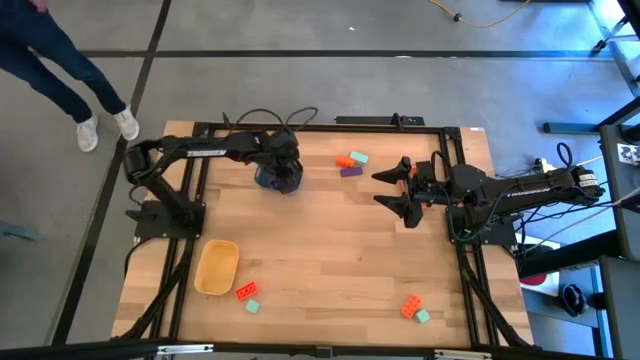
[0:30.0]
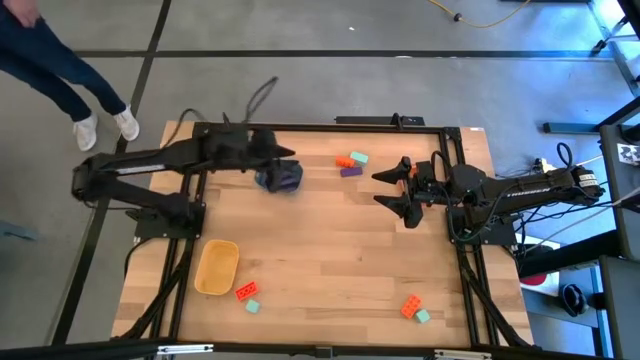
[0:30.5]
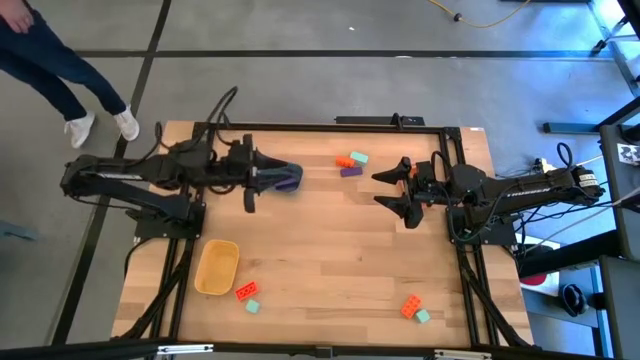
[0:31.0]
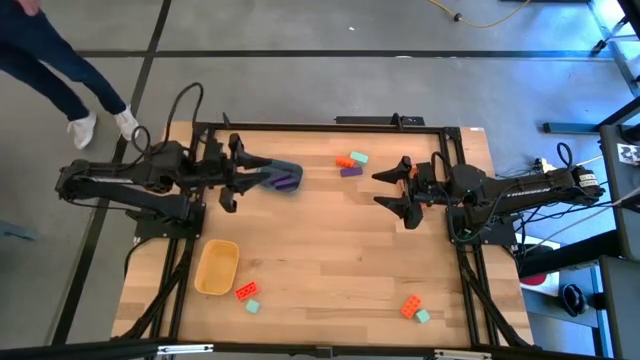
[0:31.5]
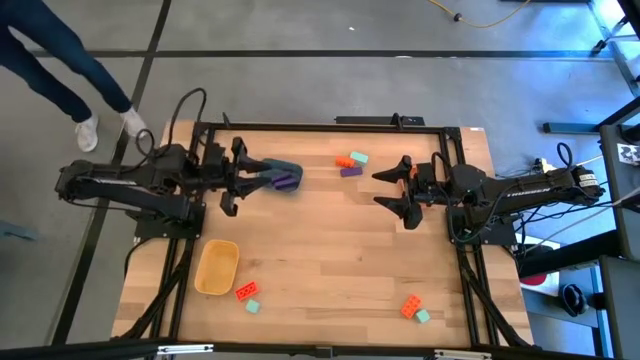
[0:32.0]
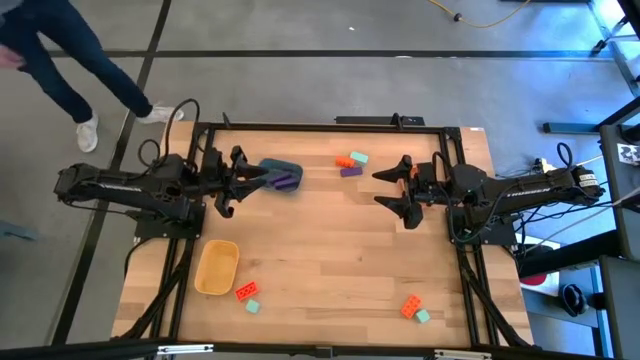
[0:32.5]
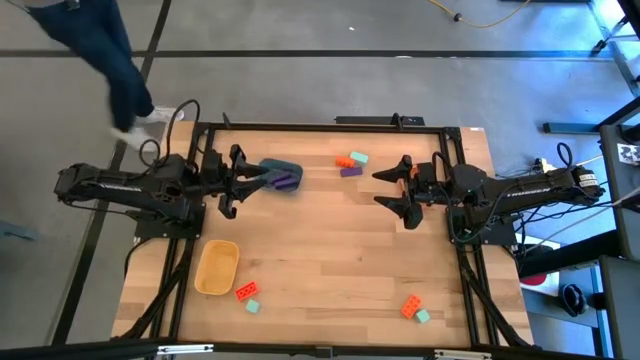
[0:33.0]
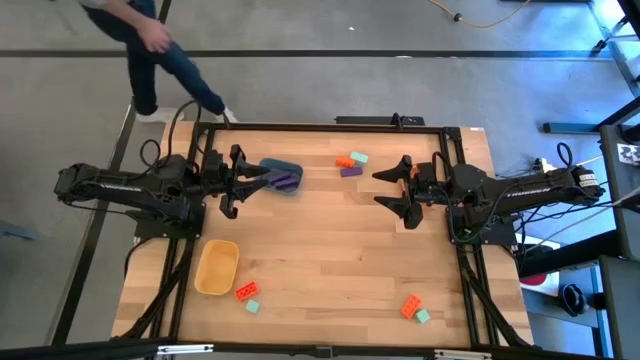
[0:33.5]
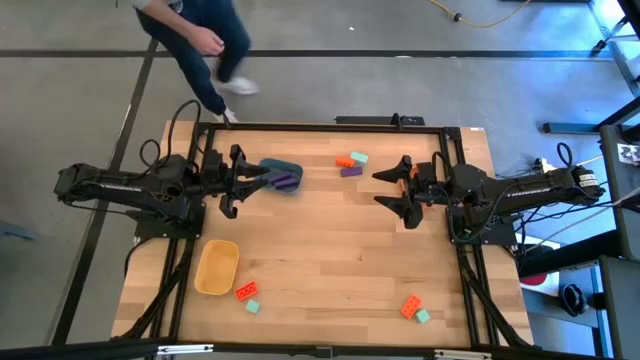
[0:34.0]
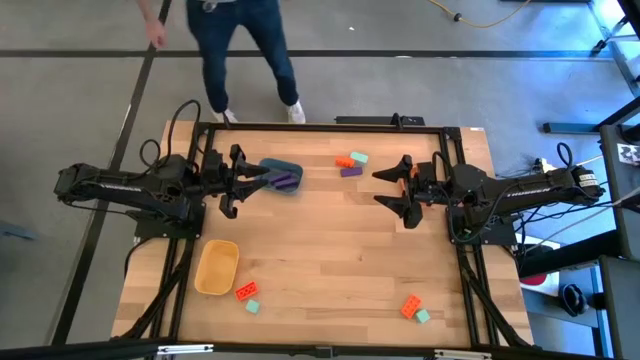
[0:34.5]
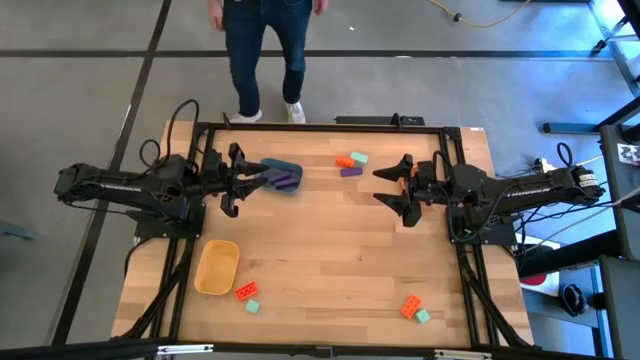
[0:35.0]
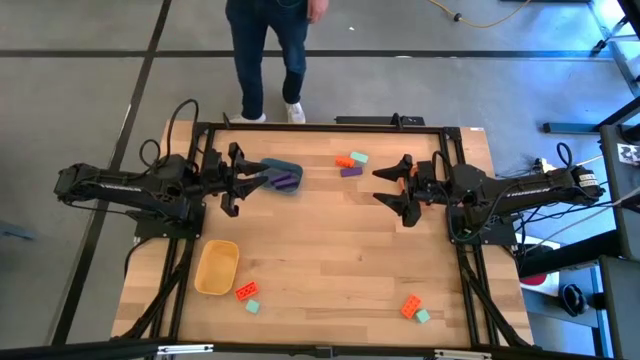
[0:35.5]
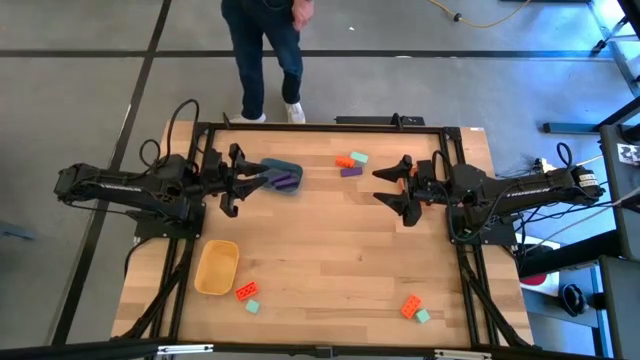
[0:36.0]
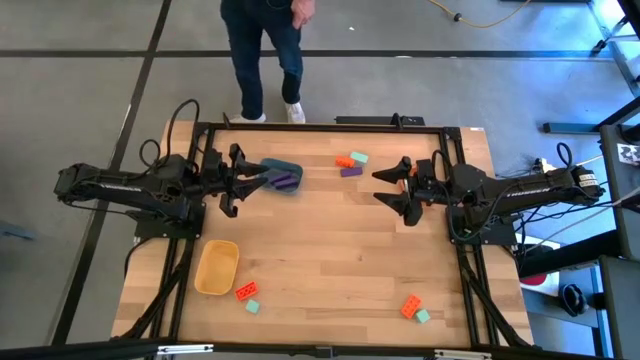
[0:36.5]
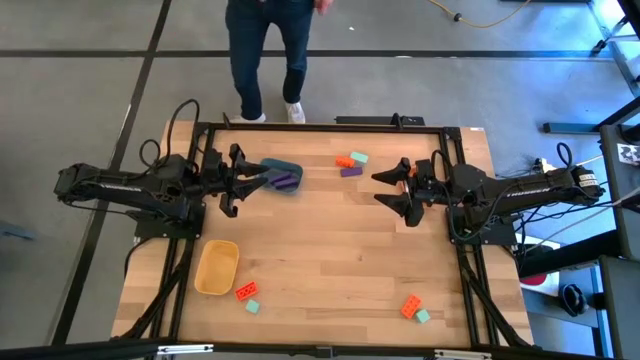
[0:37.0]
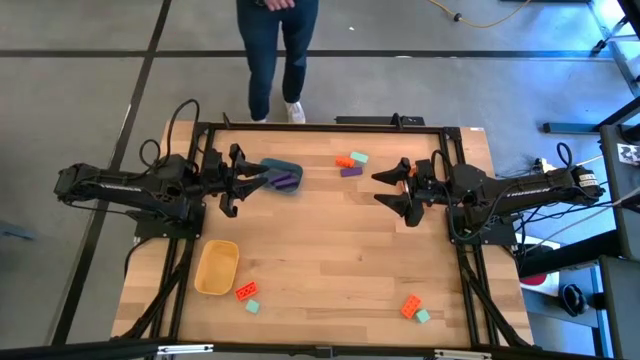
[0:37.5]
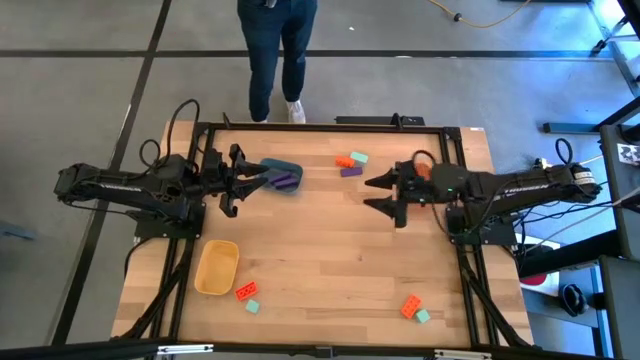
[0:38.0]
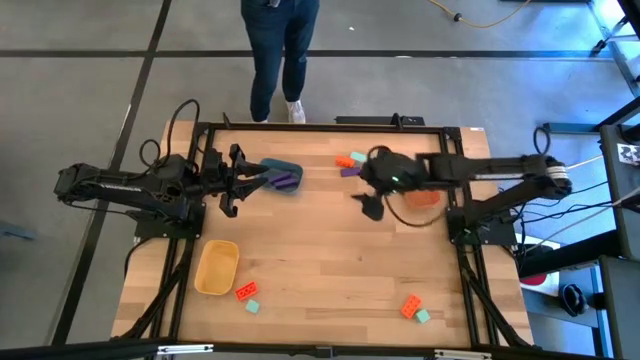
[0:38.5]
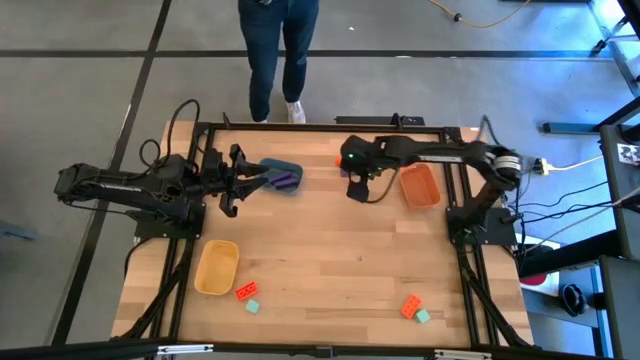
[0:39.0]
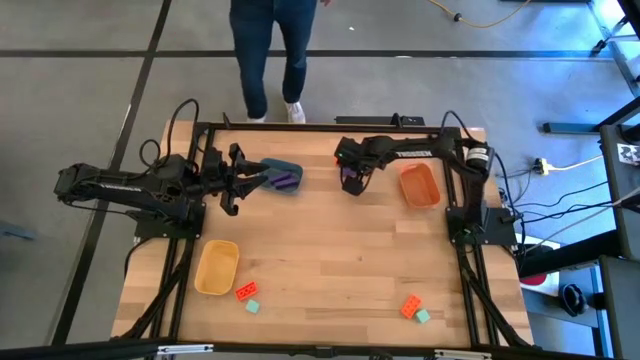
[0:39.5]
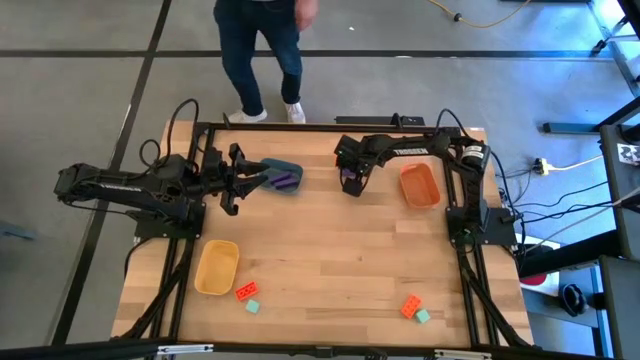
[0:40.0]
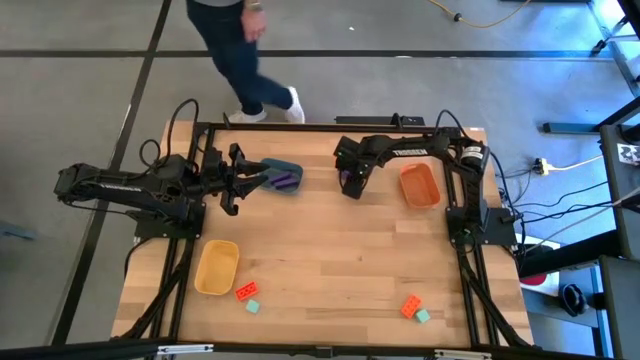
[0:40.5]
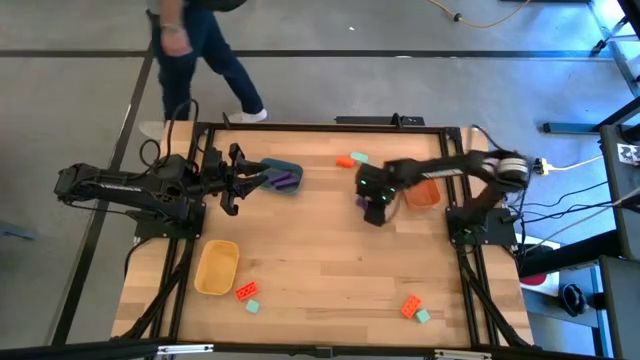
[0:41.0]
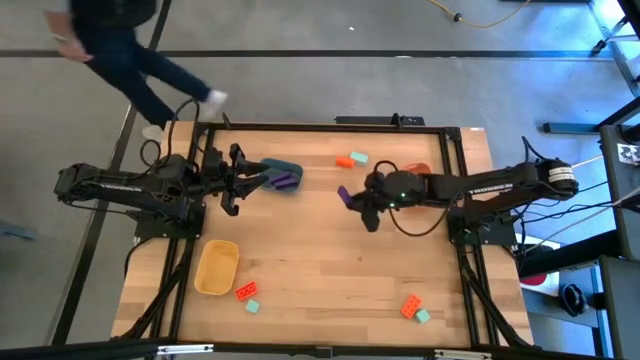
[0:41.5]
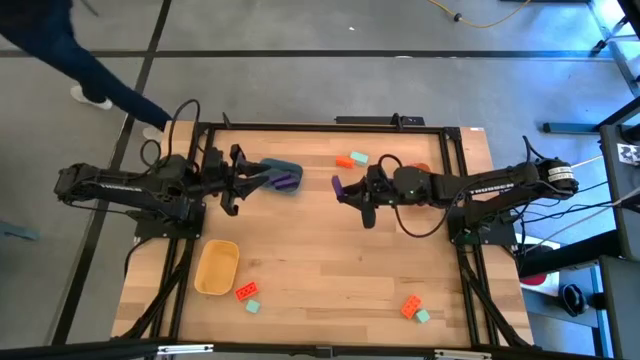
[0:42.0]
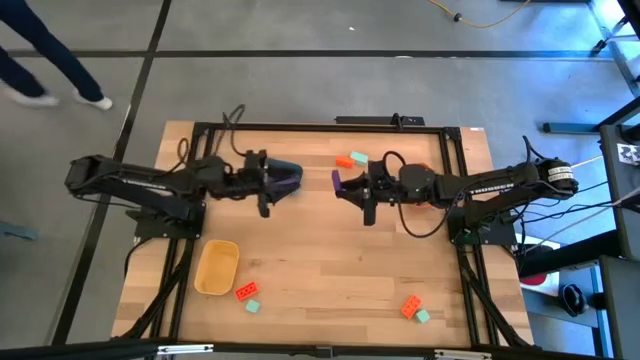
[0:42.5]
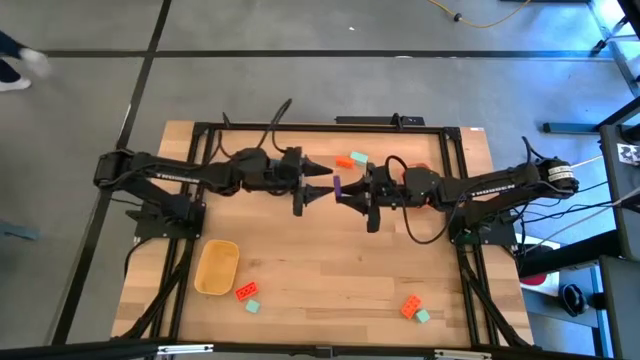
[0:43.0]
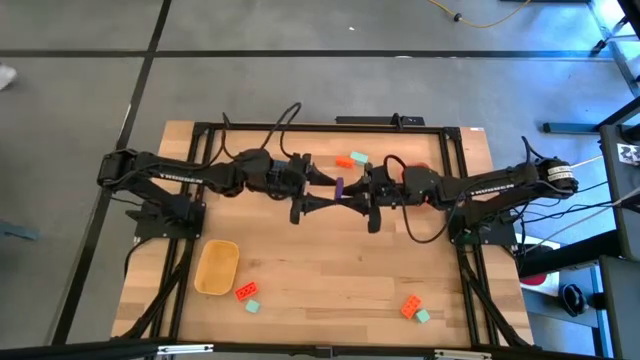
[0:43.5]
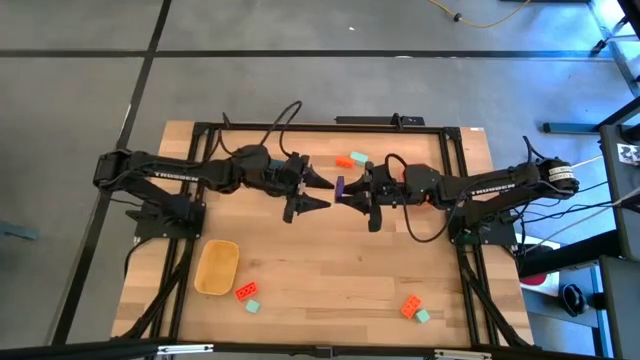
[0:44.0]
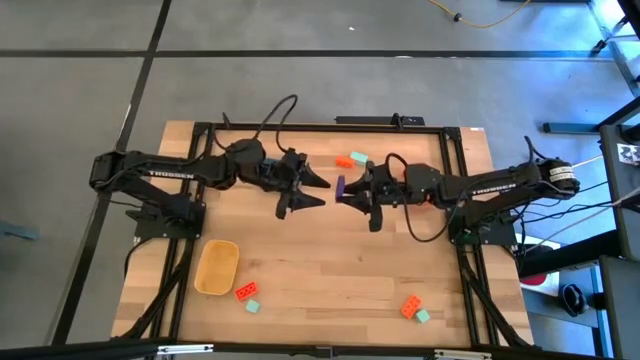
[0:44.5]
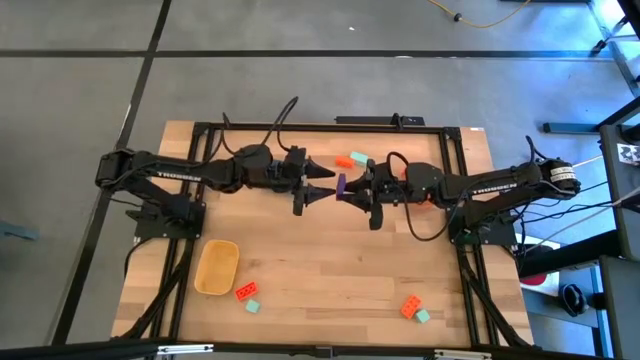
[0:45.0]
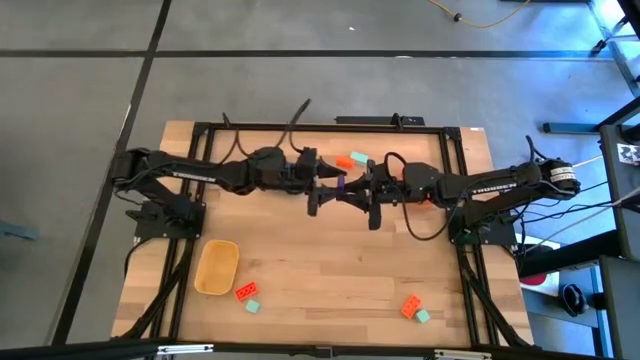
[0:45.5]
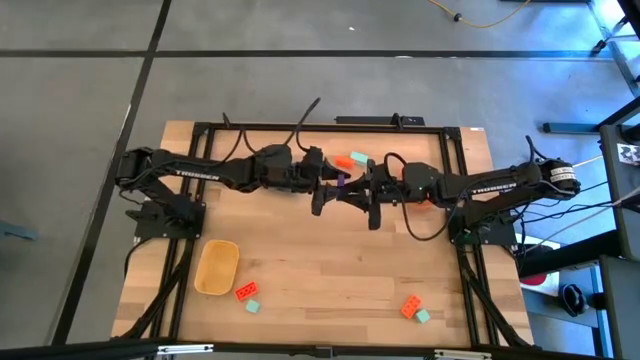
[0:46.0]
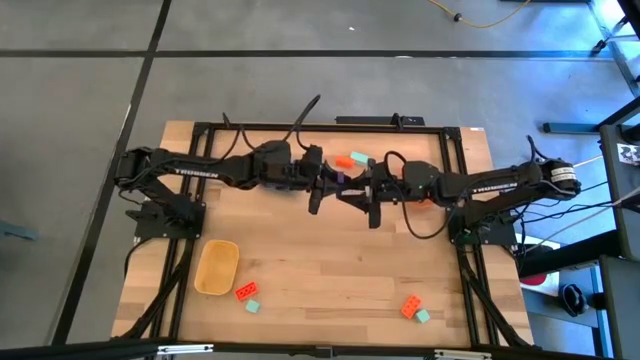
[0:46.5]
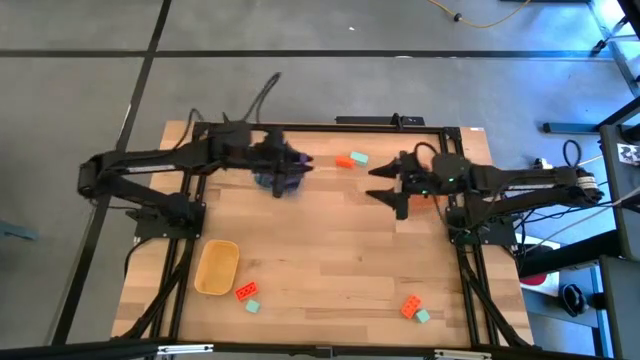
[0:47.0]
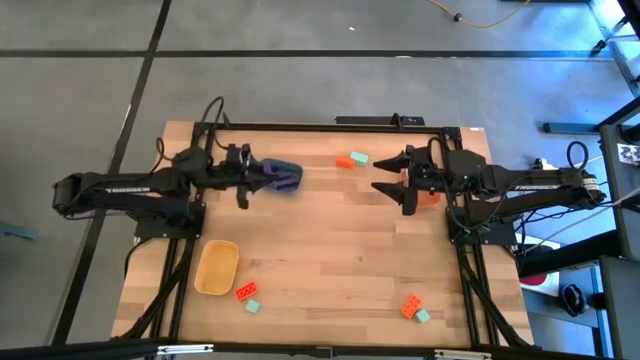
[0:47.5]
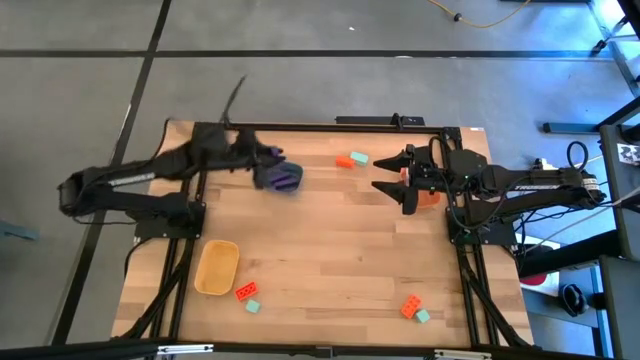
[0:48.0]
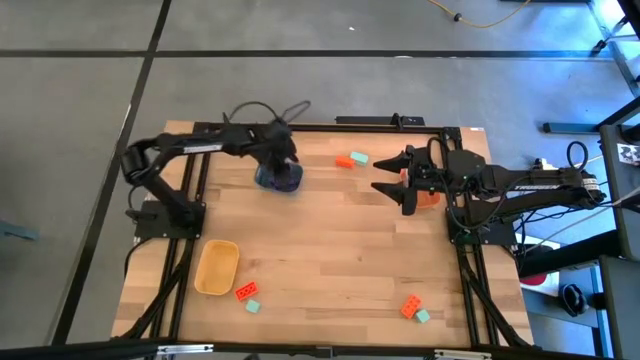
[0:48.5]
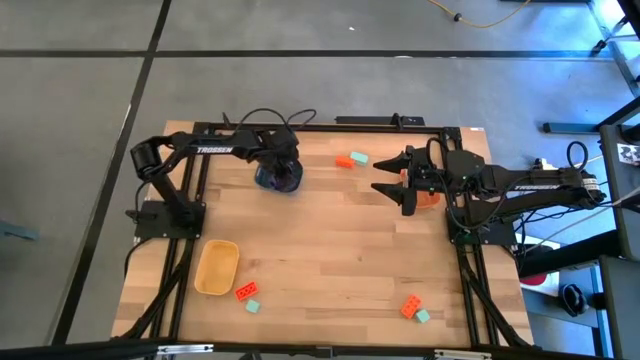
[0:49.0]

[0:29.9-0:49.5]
Task: Sort & place blocks by color
Put the violet rectangle block into the blue bin
